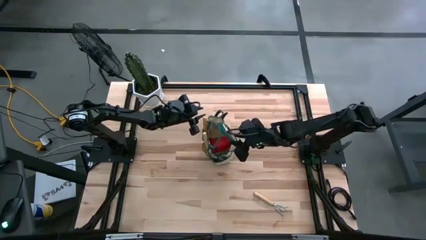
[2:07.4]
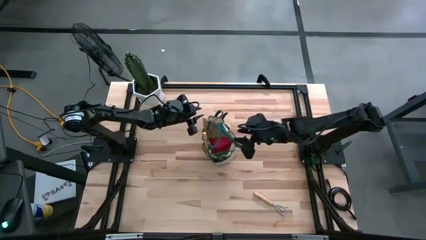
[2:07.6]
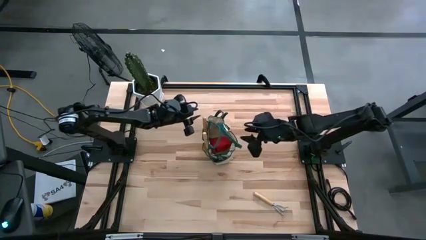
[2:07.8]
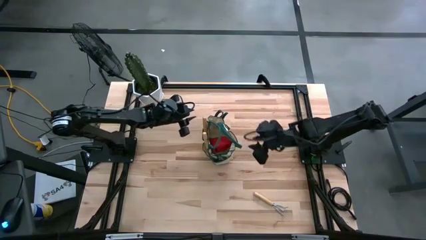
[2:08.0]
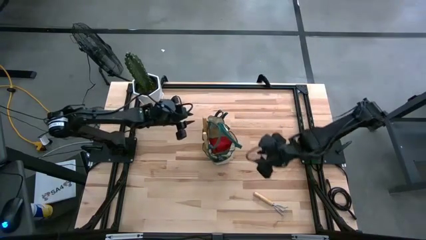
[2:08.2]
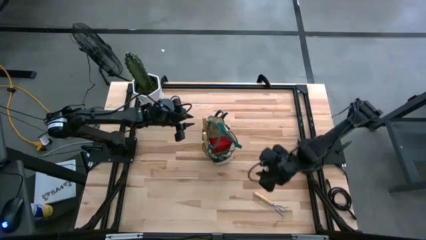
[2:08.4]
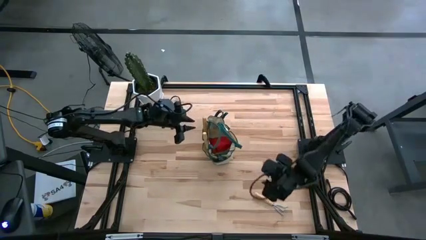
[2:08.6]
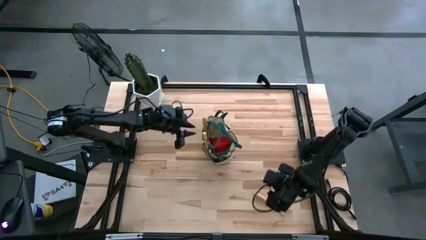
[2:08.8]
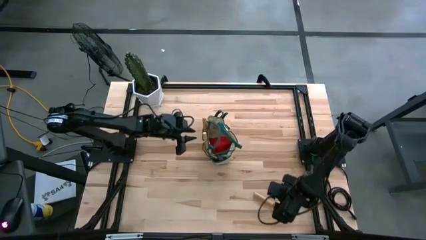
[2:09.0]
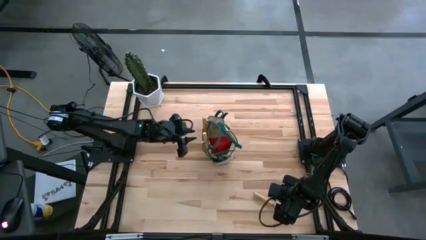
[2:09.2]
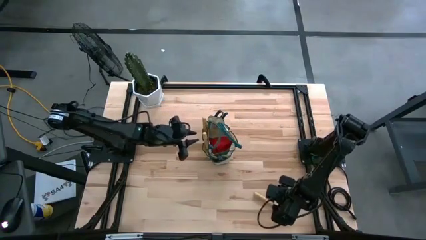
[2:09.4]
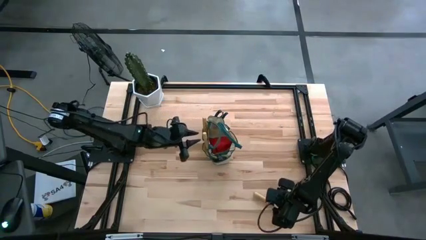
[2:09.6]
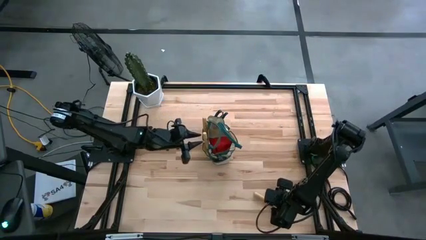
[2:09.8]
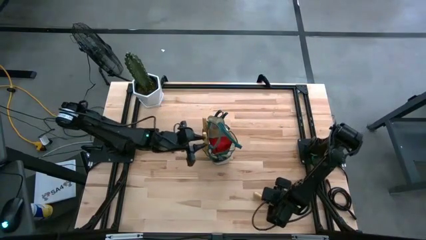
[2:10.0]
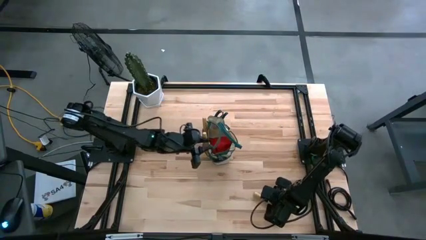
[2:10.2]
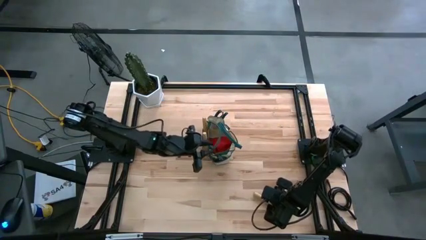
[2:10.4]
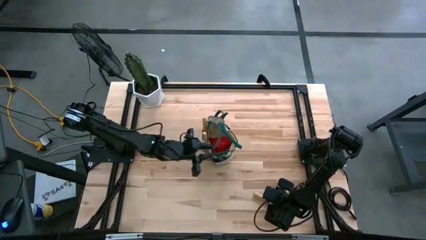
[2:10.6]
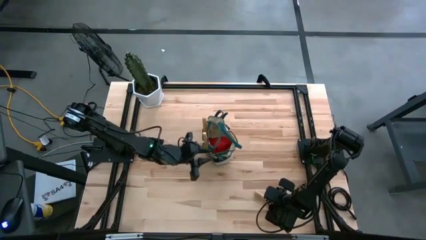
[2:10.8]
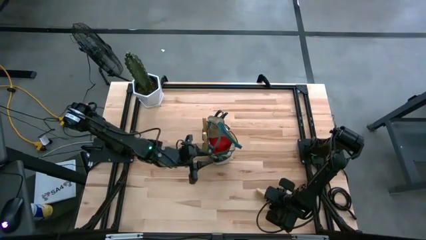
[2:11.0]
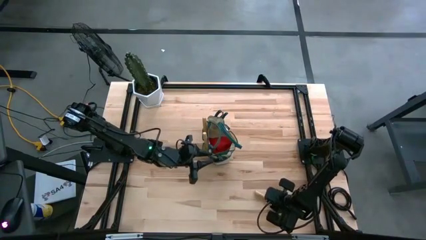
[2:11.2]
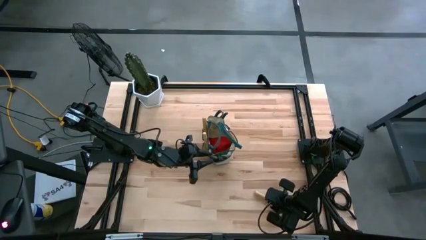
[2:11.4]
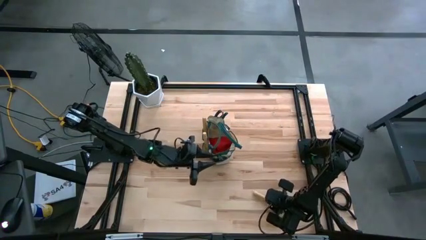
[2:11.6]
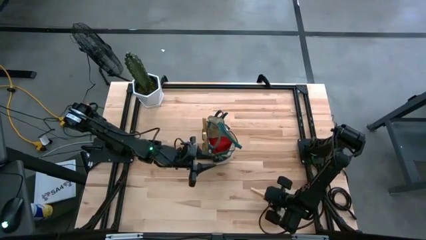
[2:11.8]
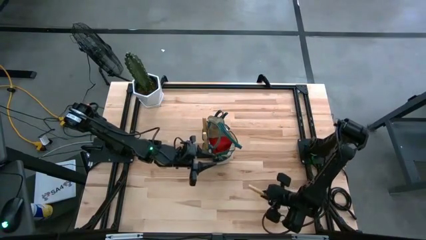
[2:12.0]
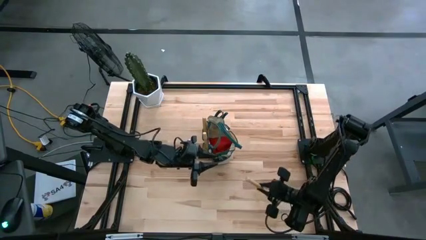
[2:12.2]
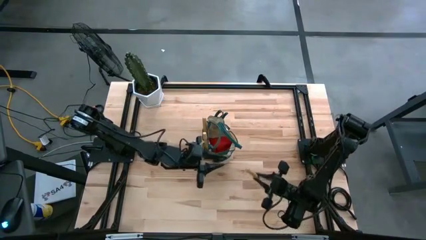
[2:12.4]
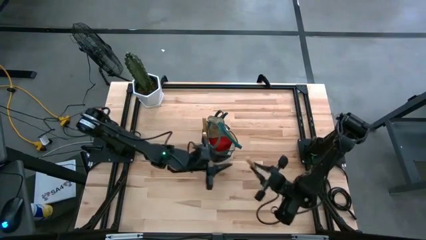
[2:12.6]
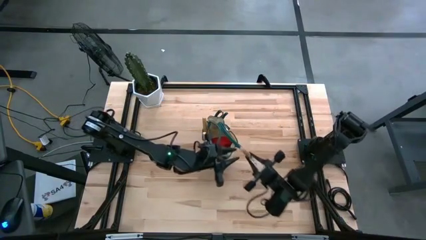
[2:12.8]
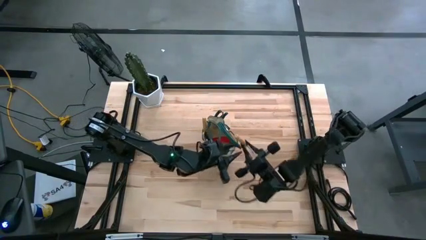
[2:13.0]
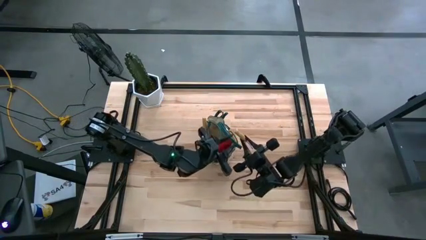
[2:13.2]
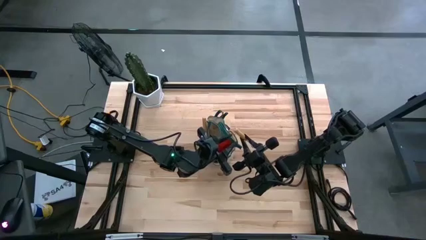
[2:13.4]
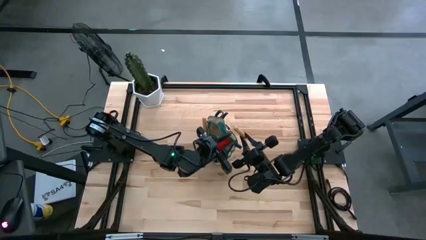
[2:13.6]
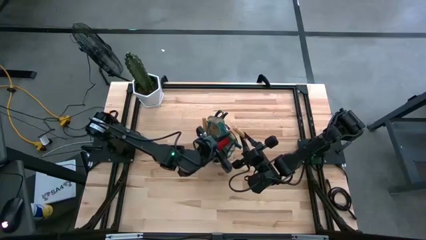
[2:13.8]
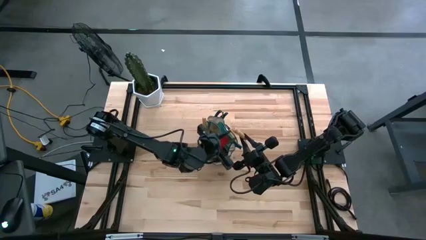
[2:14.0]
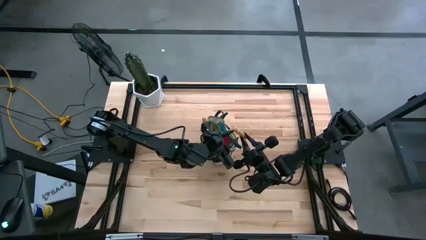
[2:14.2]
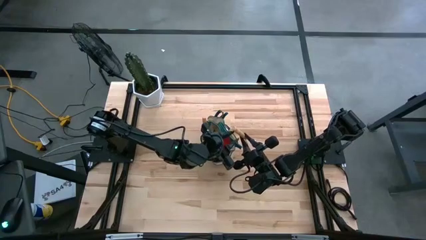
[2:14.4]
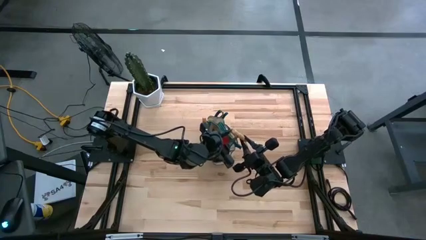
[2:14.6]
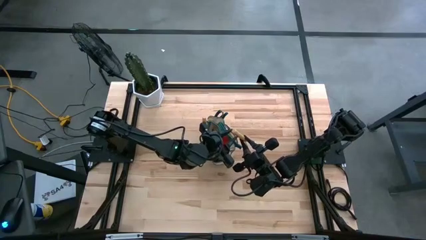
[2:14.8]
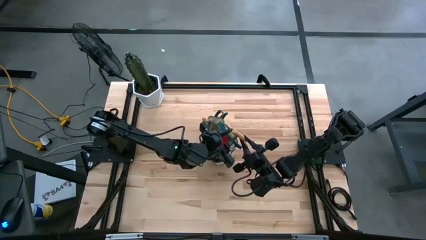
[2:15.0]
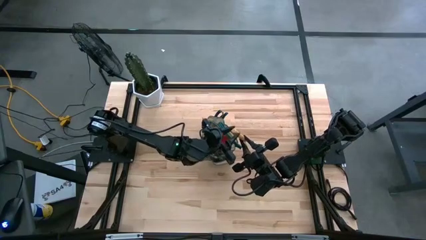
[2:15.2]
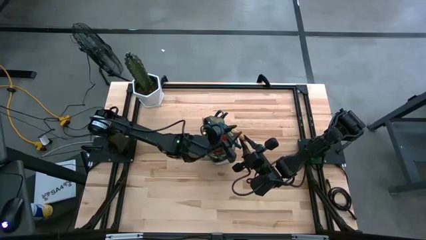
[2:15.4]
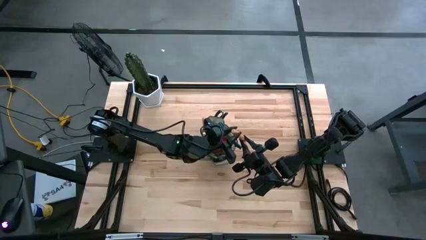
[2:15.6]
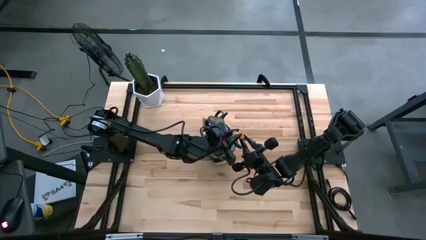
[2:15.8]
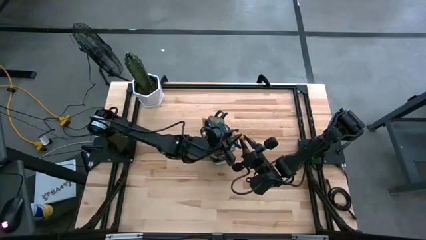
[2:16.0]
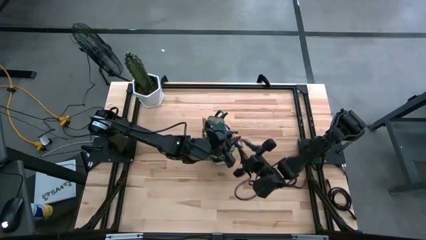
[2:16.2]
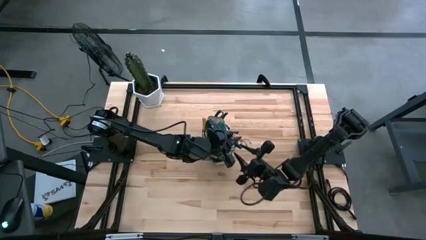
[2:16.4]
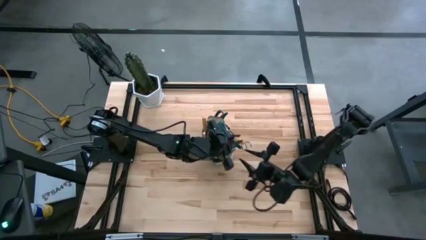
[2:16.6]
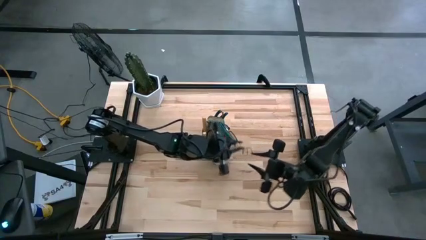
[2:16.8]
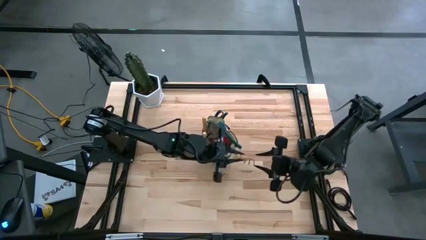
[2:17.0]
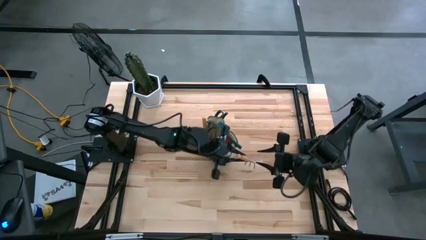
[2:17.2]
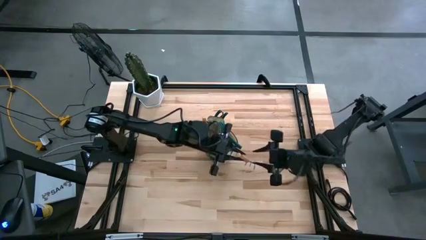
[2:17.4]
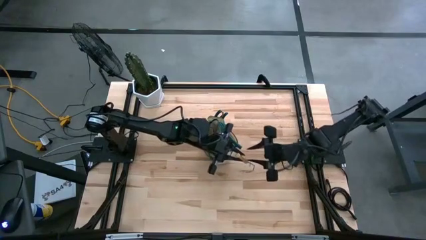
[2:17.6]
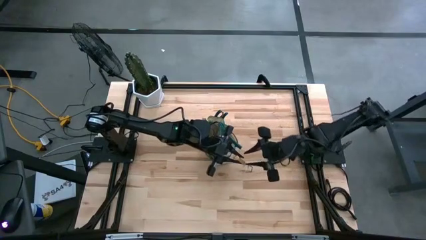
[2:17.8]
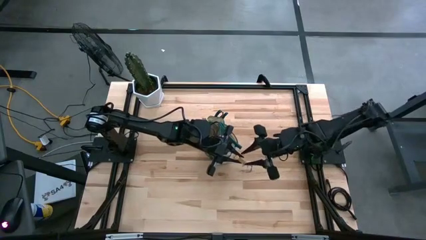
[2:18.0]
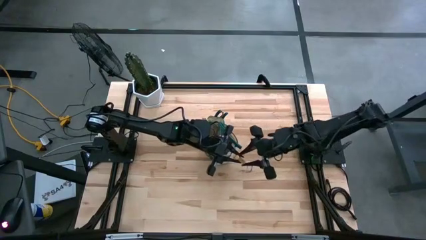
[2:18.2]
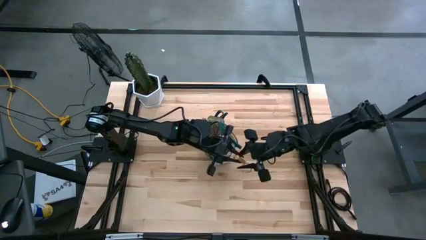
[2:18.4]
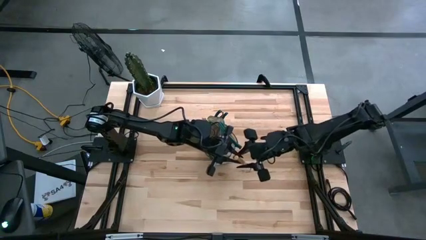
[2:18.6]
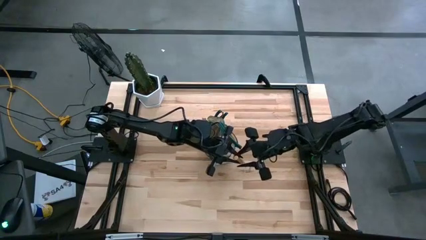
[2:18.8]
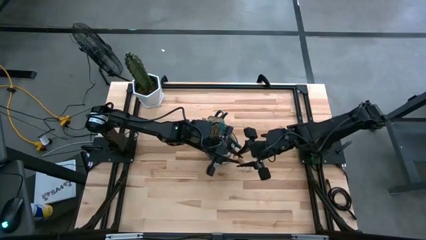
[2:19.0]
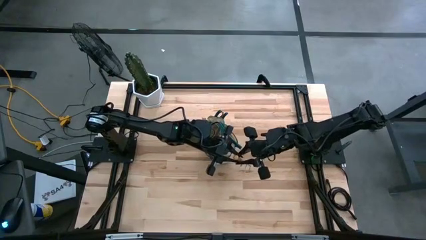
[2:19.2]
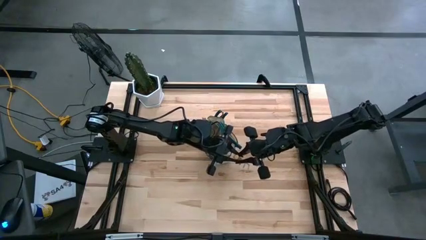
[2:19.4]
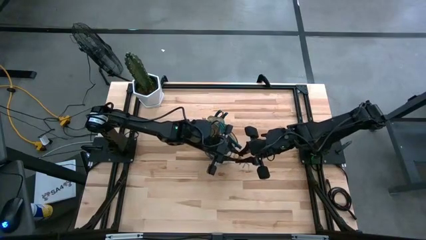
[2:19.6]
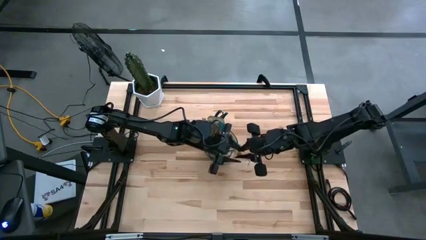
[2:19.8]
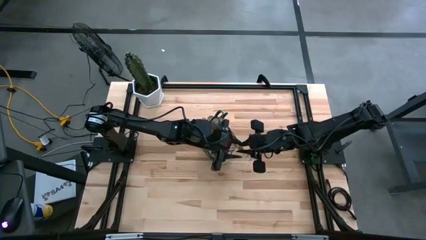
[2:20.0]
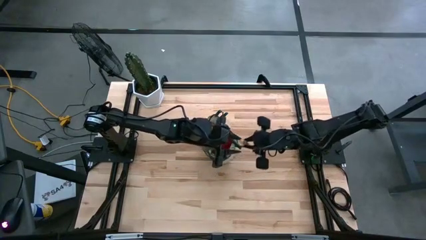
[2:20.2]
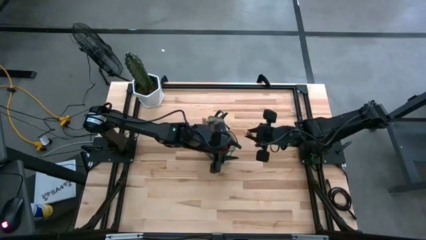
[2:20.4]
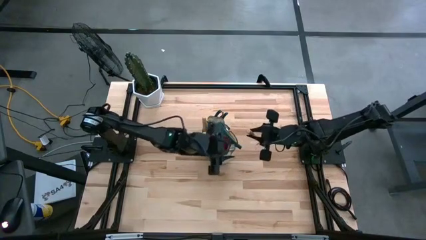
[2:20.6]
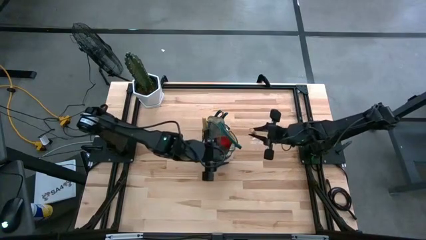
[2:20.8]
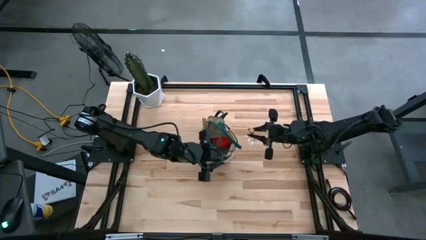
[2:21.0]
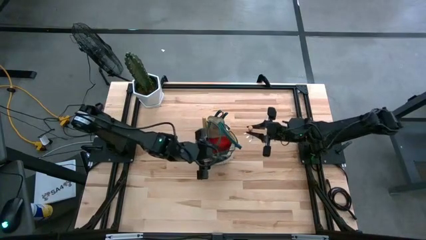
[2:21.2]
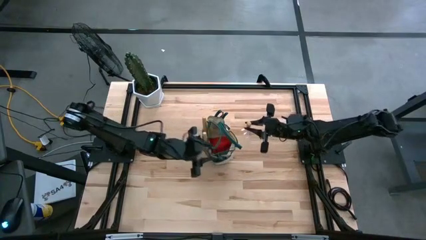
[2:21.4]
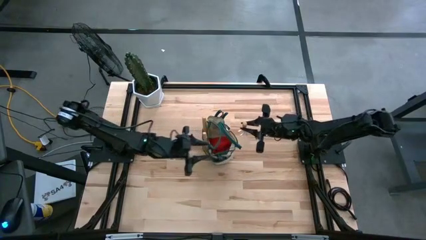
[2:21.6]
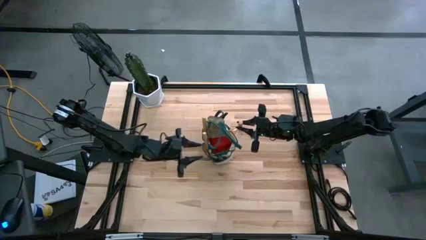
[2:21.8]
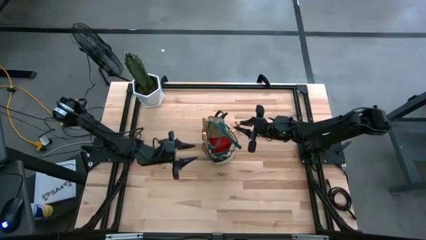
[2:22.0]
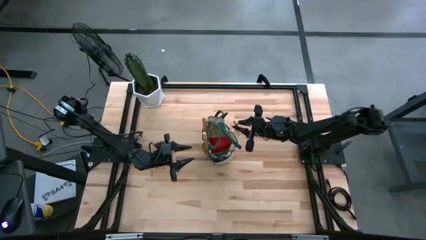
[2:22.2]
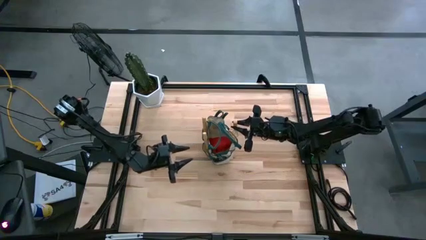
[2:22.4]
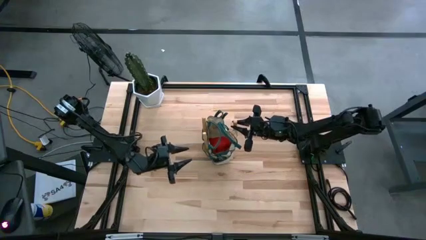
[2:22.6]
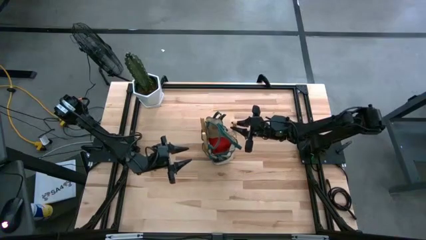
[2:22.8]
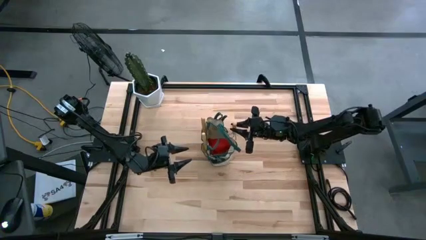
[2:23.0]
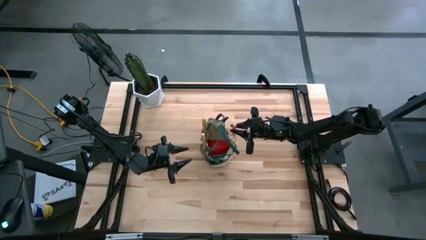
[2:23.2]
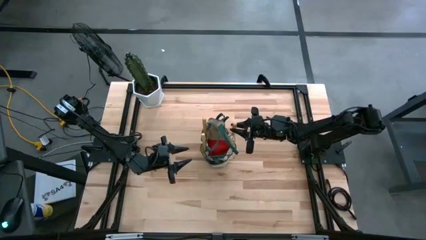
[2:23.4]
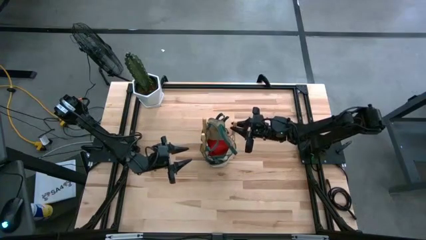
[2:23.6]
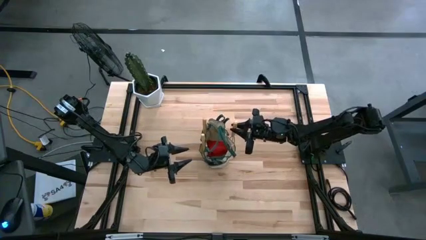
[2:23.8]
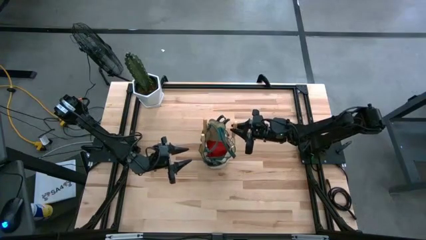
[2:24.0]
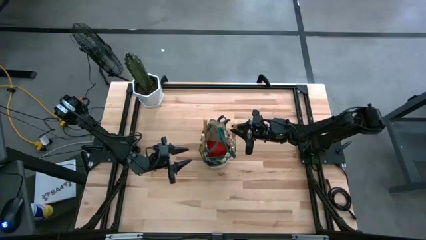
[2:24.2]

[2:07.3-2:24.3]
Task: Pick & Place Garden tools in Gardening bag
Put the brown hand rake into the gardening bag
